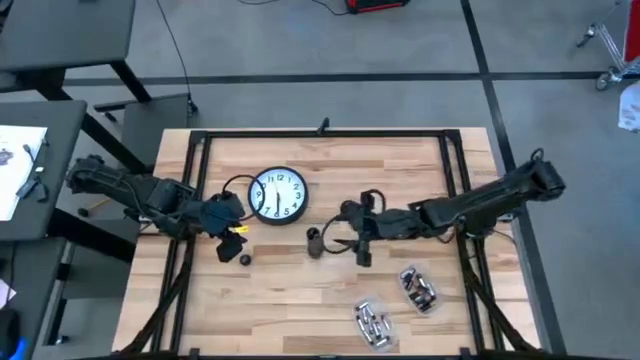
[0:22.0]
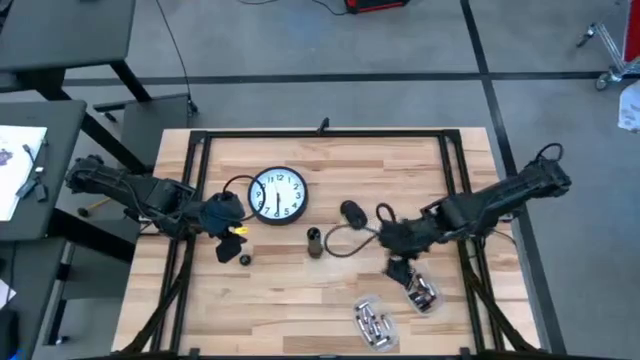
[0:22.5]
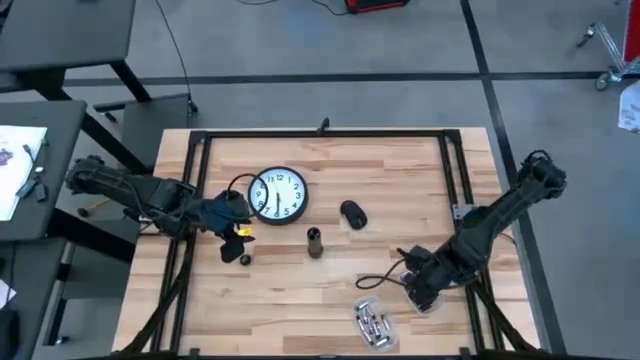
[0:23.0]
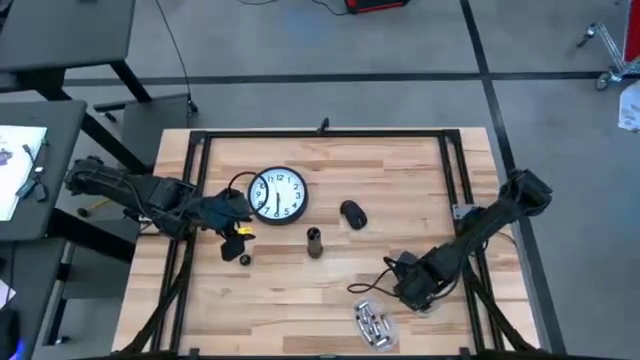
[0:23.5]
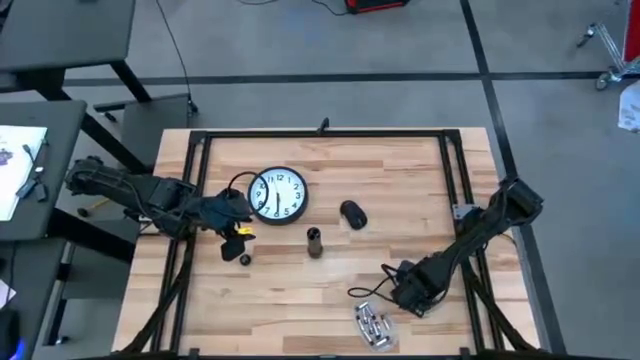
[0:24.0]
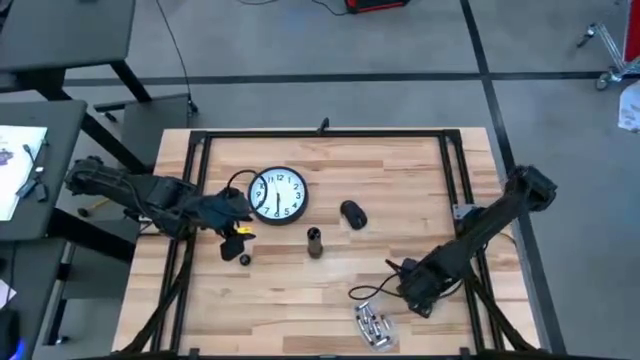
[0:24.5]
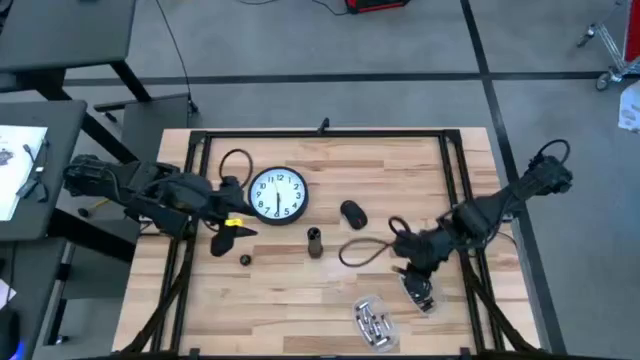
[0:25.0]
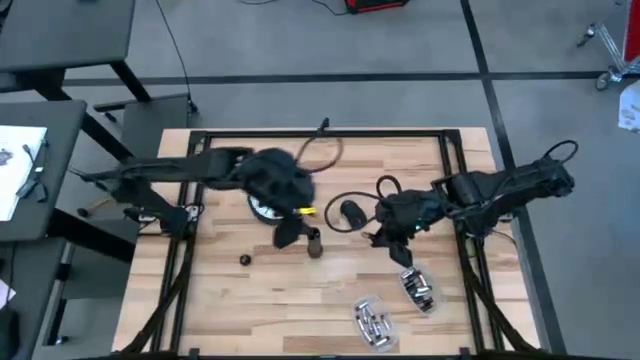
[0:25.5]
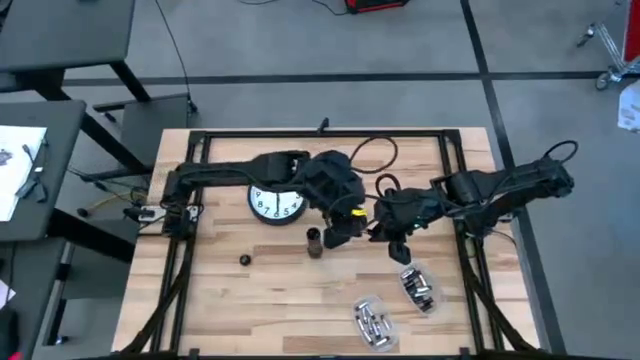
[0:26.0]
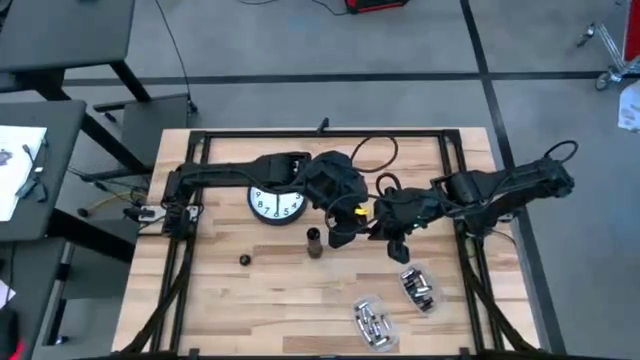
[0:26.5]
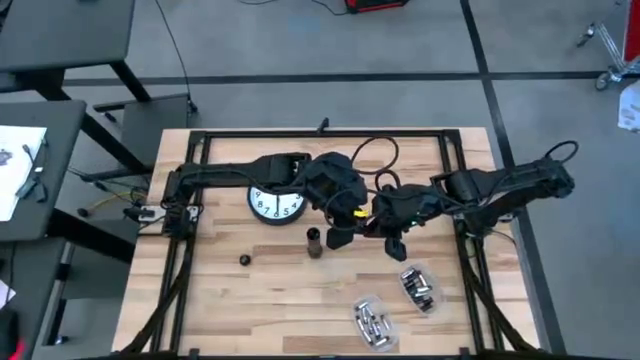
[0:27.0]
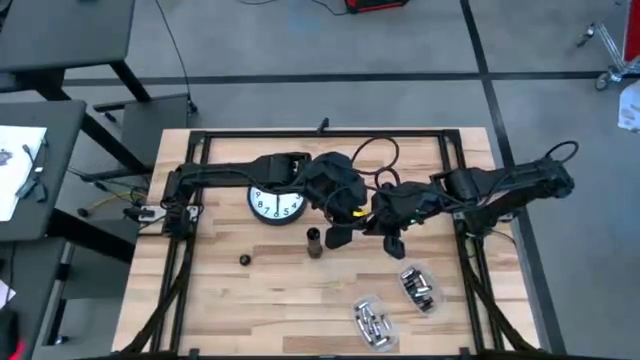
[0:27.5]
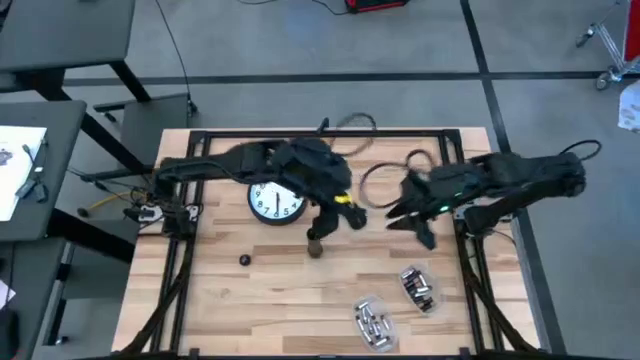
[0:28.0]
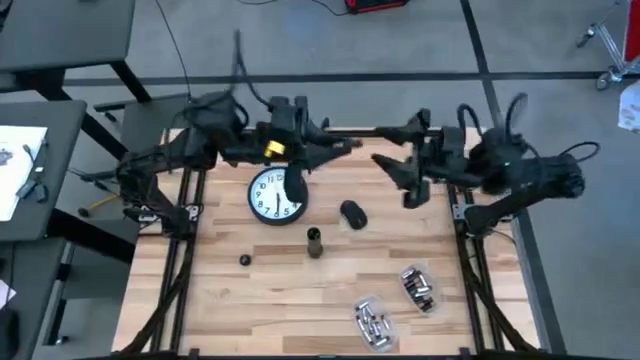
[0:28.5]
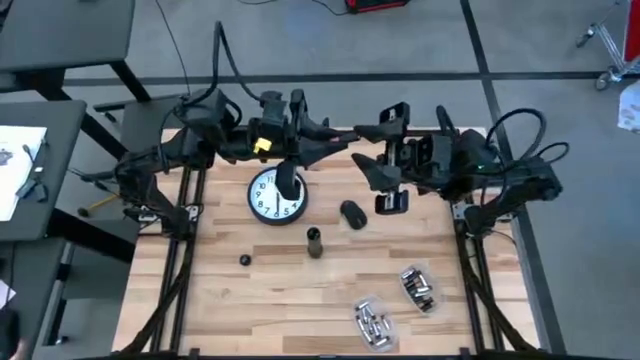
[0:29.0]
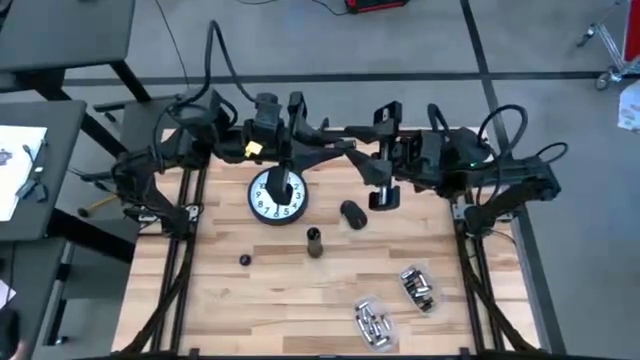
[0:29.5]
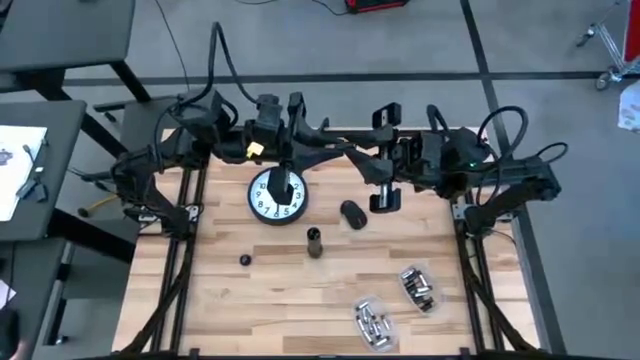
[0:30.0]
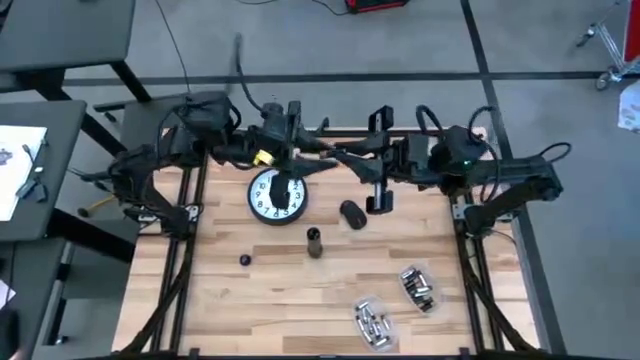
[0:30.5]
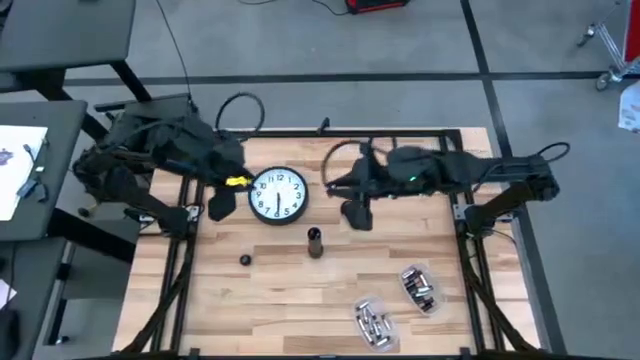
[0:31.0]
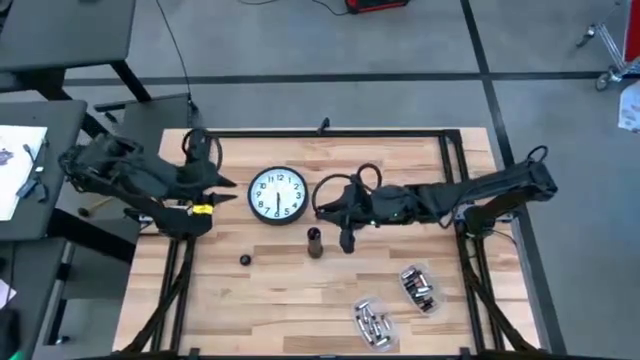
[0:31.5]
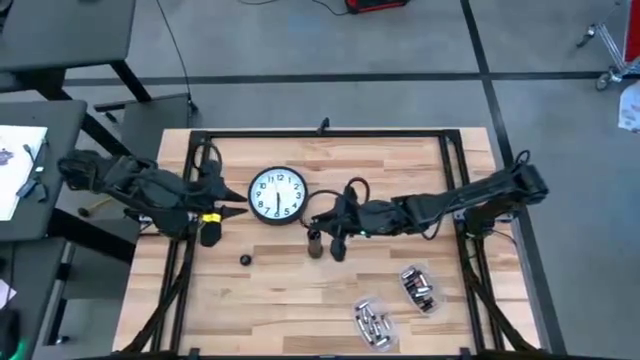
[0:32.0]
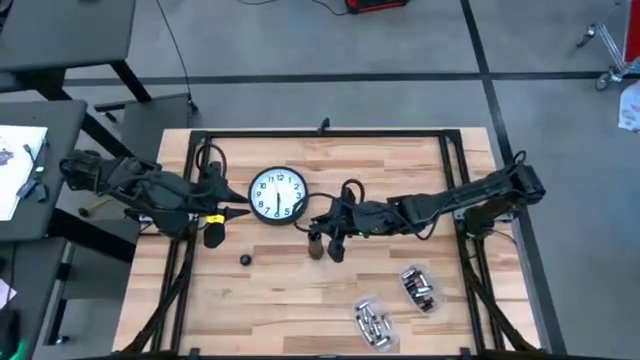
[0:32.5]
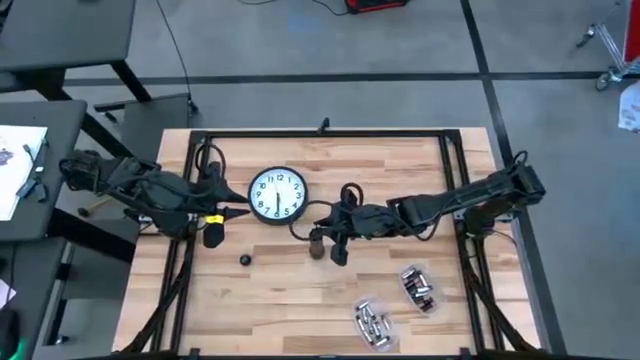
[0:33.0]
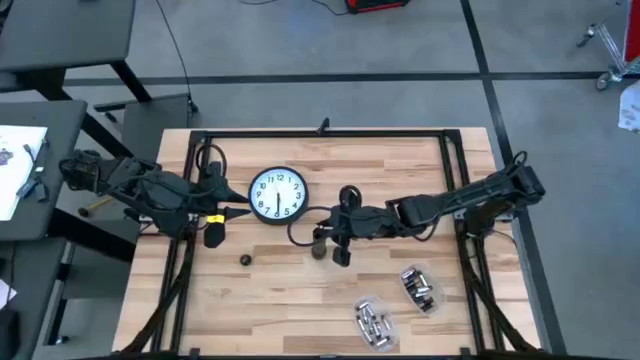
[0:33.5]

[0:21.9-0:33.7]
Task: Insert battery
Insert the brown battery into the black flashlight battery compartment

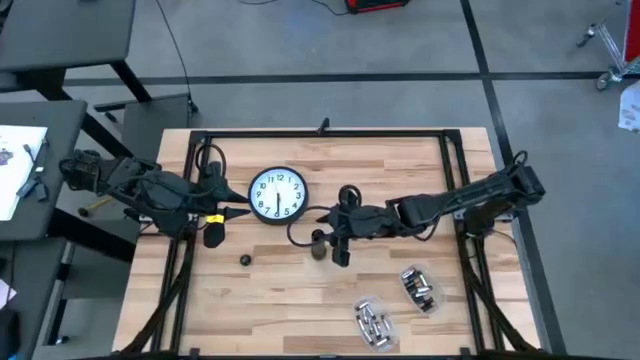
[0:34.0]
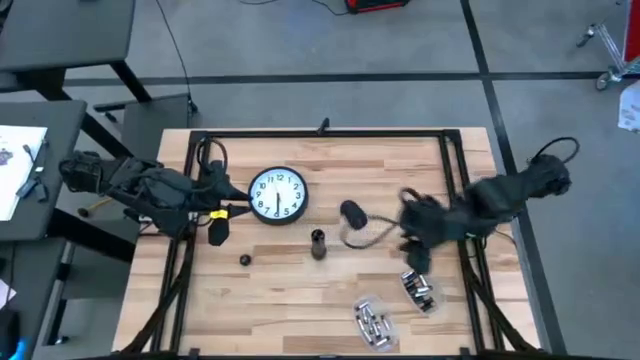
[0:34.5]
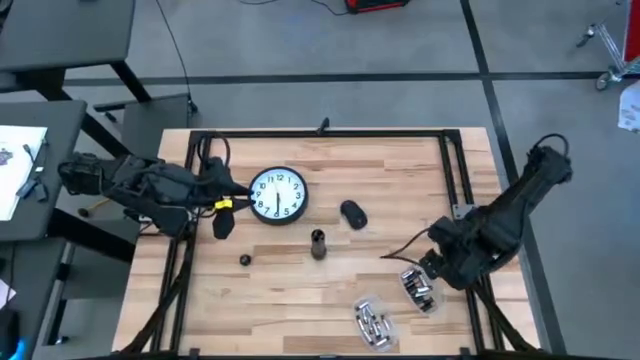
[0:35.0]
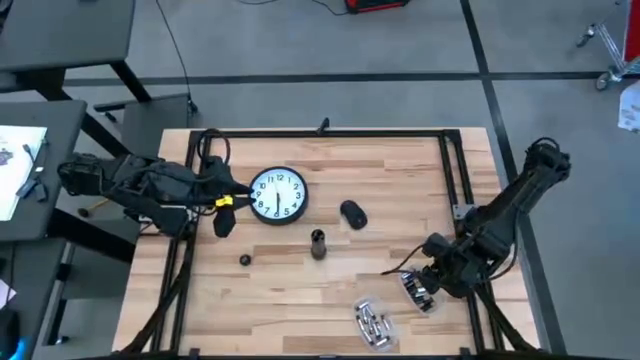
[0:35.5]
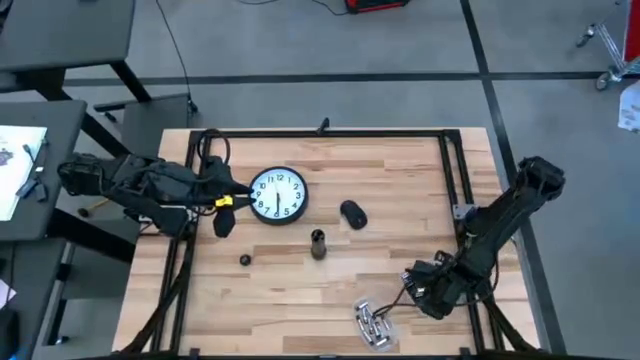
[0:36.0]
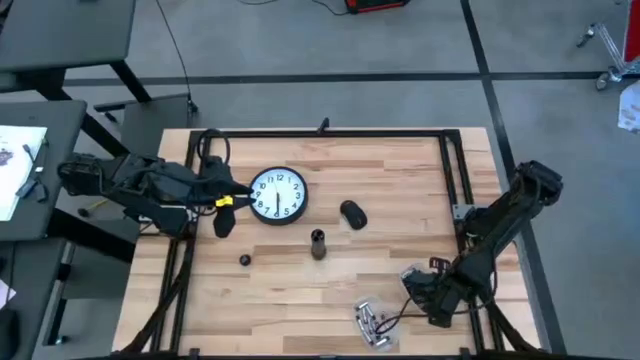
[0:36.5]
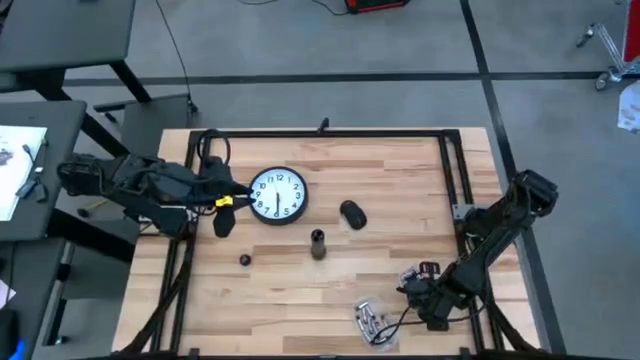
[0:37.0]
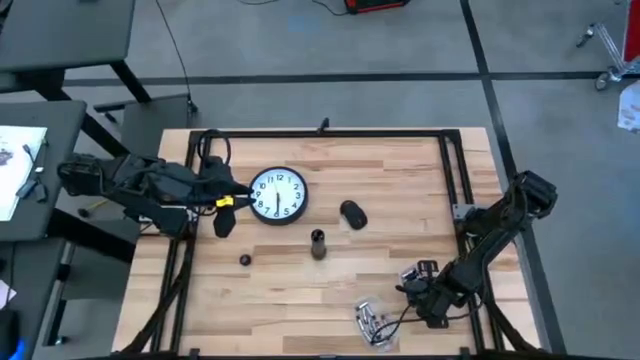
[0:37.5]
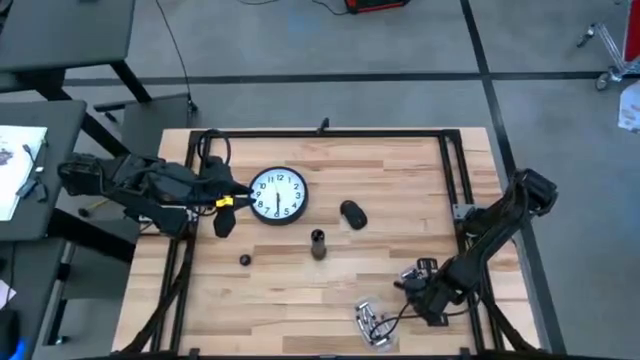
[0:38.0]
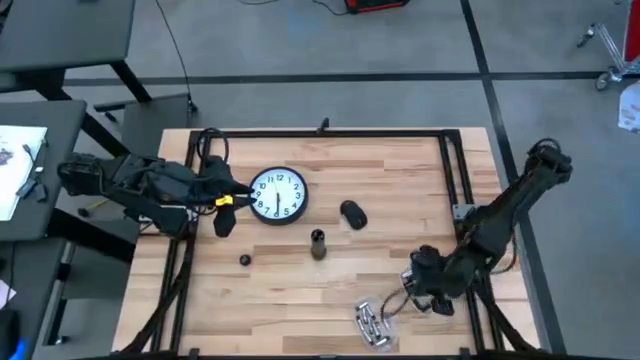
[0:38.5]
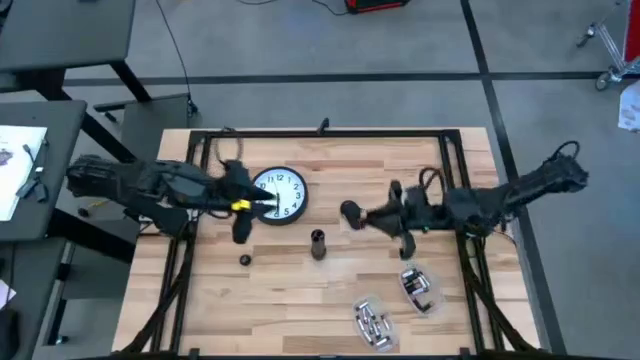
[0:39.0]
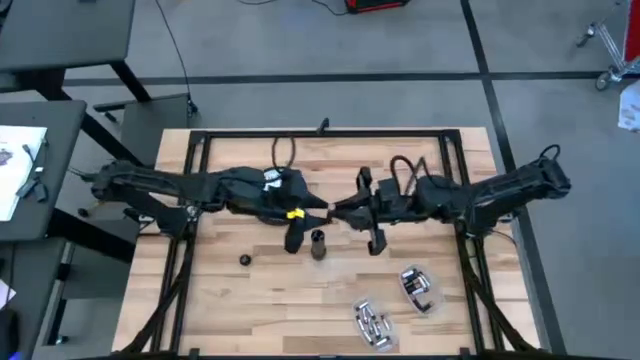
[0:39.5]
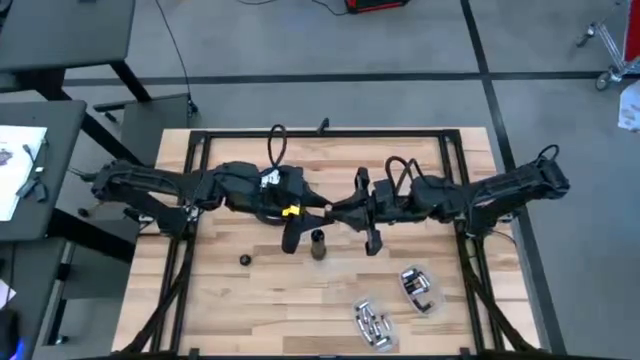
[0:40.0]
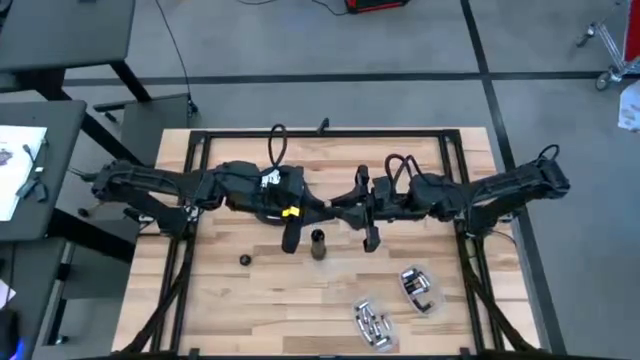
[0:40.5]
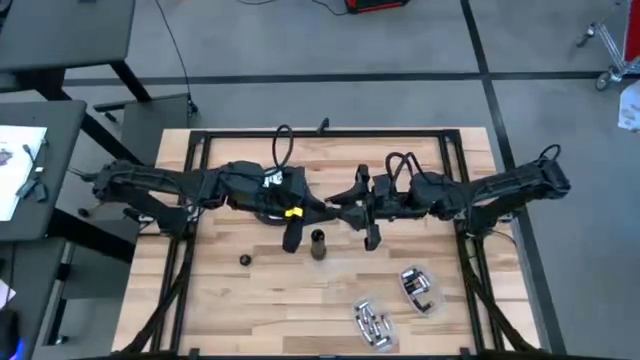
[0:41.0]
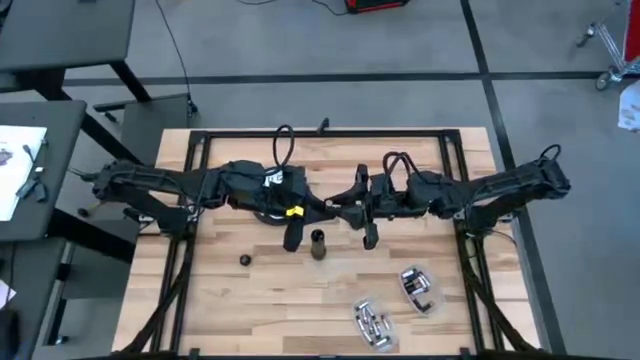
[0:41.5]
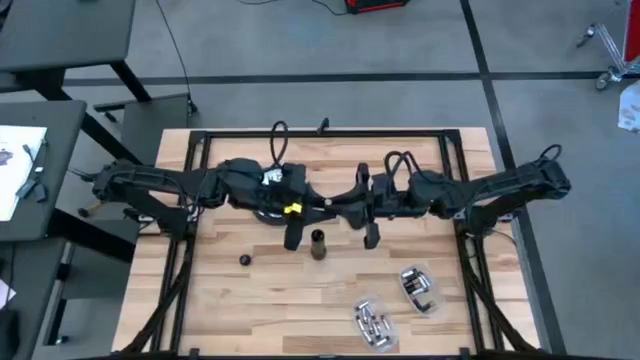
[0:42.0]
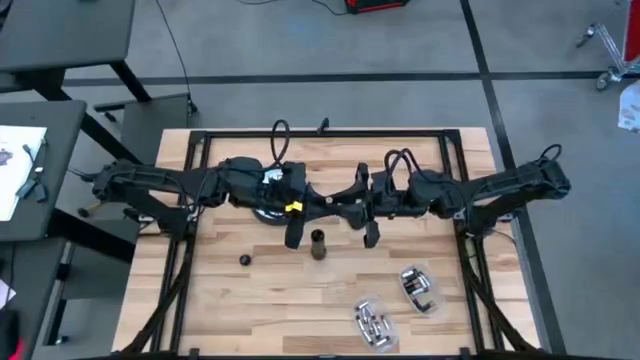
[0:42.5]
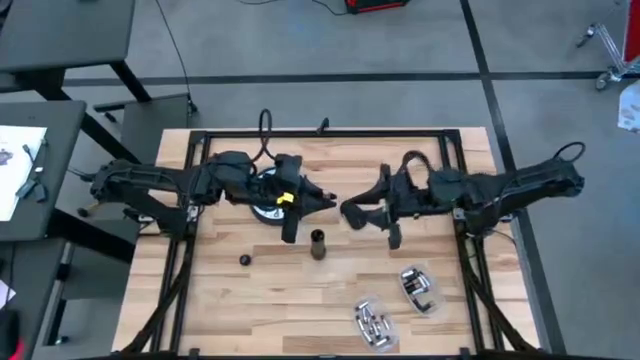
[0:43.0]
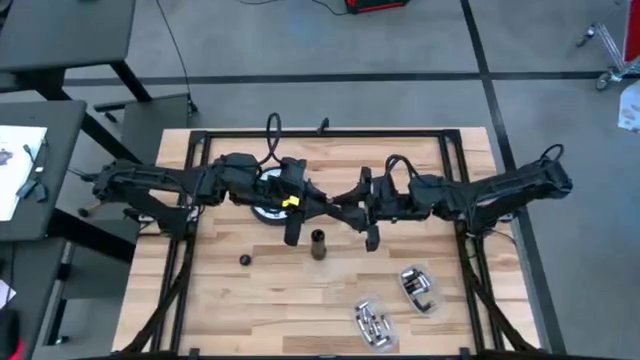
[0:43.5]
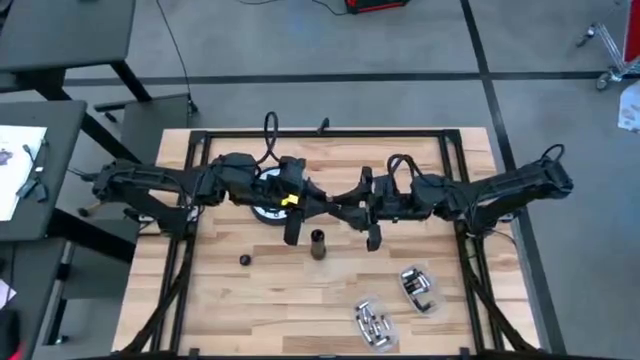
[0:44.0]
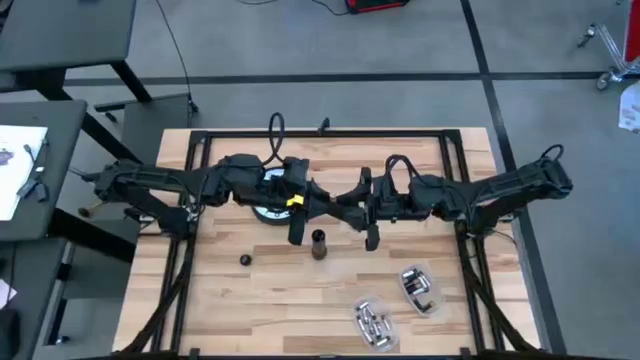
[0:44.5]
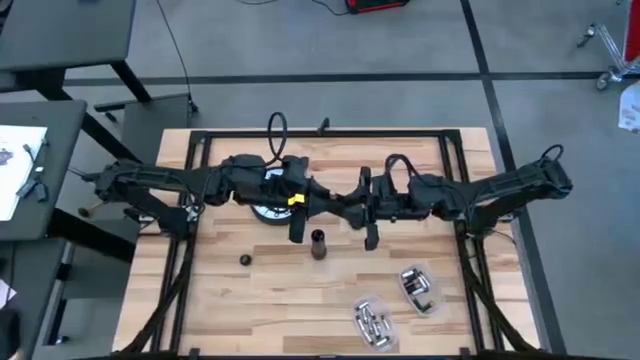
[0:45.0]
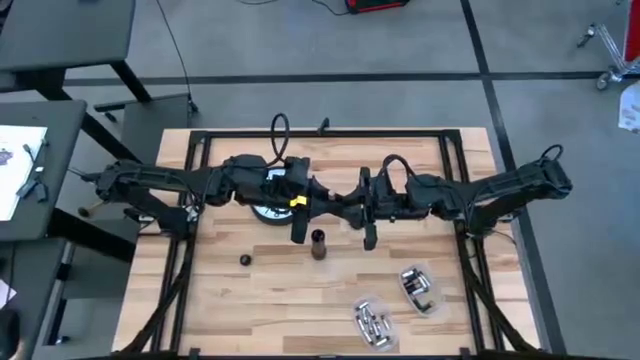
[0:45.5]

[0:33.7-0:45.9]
Insert the brown battery into the black flashlight battery compartment
